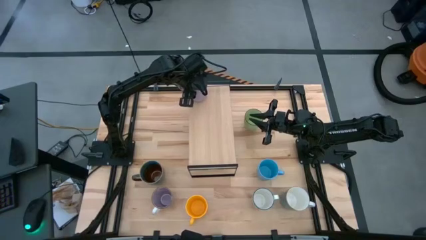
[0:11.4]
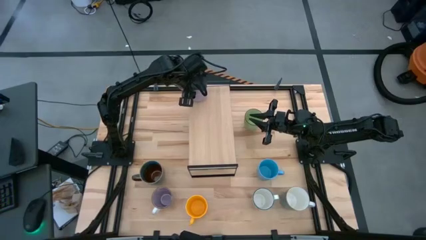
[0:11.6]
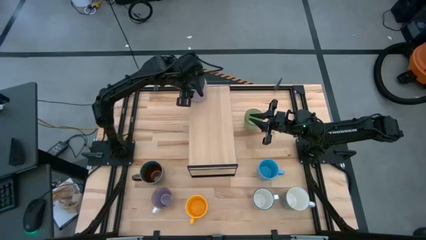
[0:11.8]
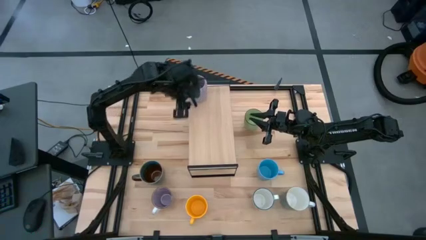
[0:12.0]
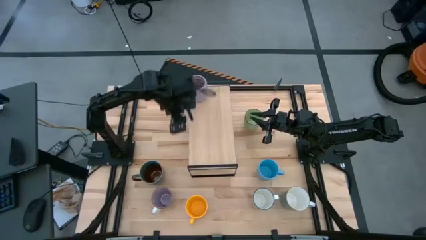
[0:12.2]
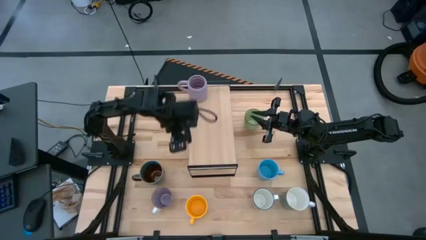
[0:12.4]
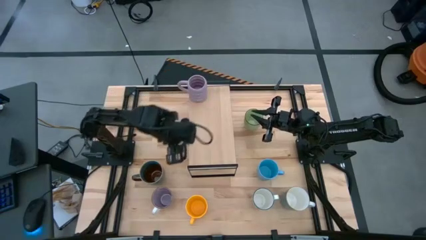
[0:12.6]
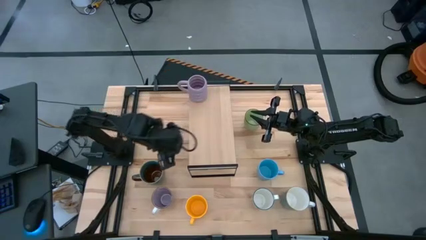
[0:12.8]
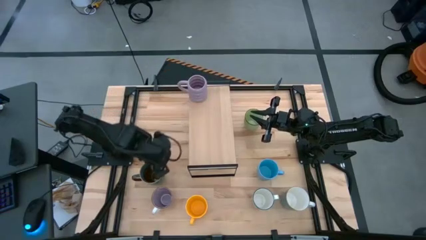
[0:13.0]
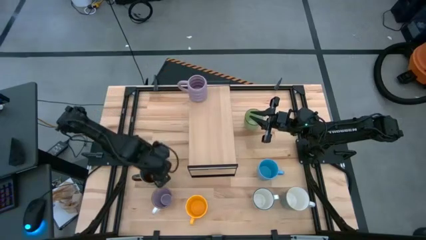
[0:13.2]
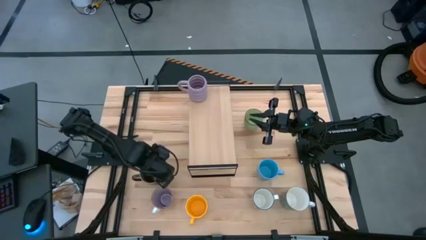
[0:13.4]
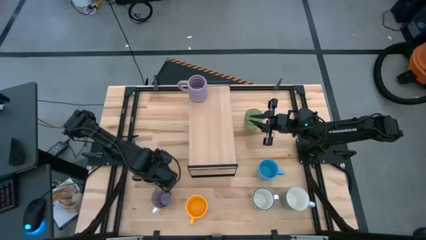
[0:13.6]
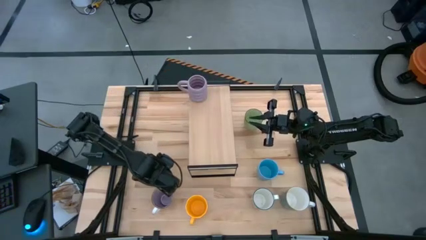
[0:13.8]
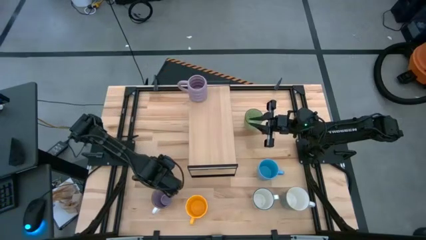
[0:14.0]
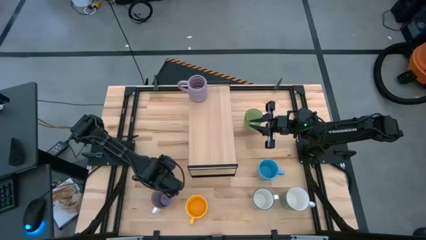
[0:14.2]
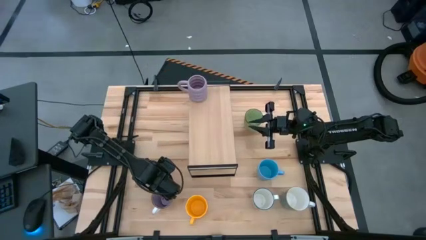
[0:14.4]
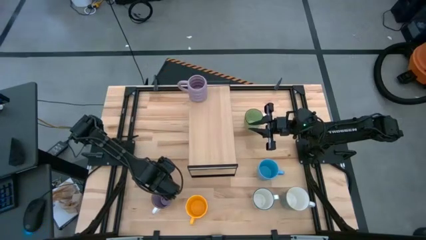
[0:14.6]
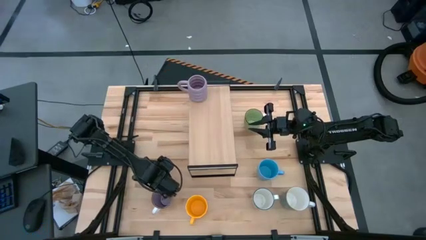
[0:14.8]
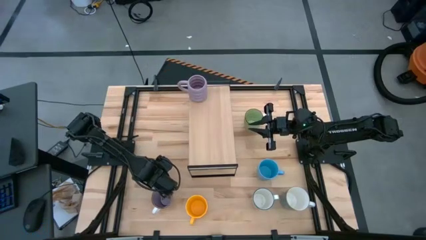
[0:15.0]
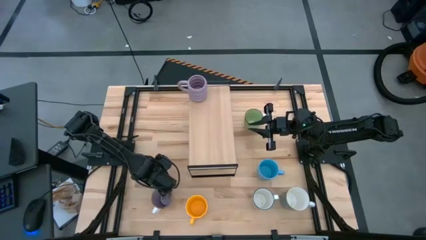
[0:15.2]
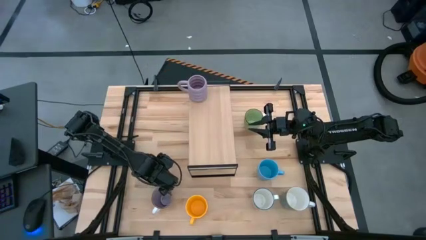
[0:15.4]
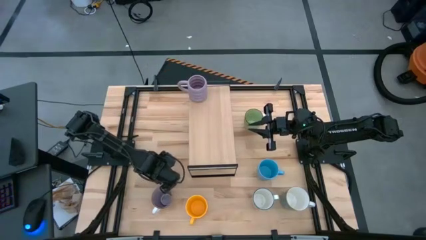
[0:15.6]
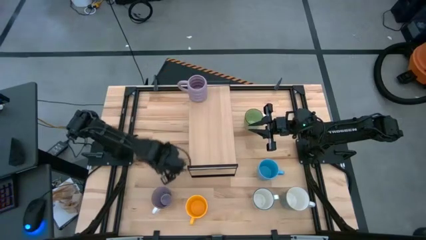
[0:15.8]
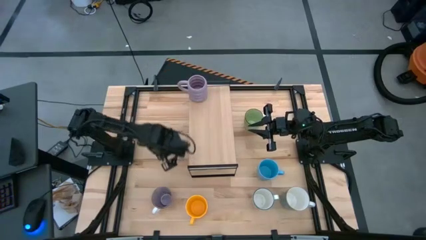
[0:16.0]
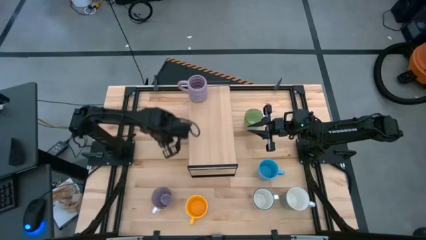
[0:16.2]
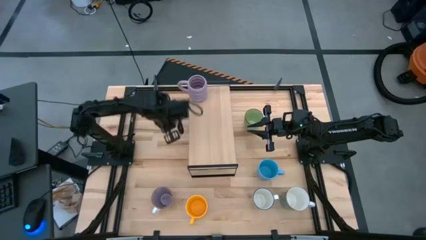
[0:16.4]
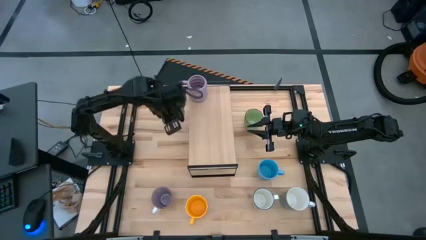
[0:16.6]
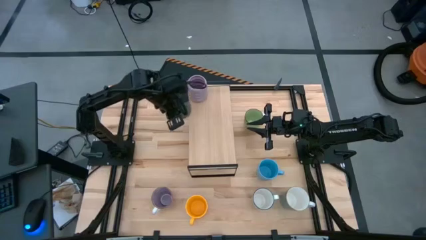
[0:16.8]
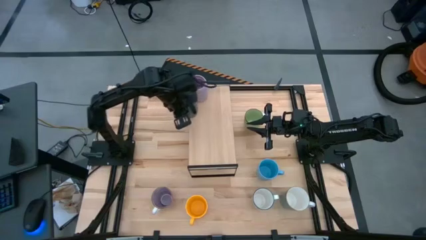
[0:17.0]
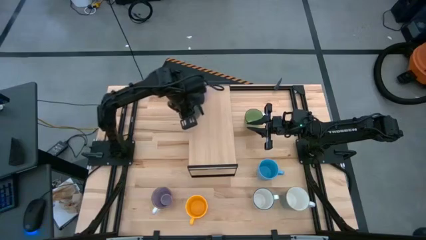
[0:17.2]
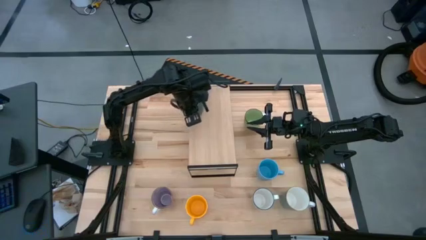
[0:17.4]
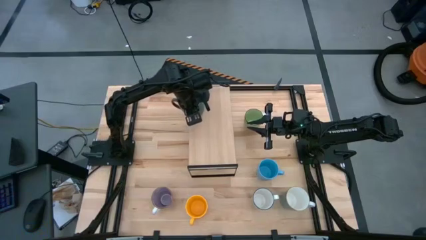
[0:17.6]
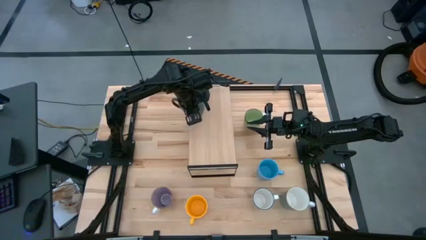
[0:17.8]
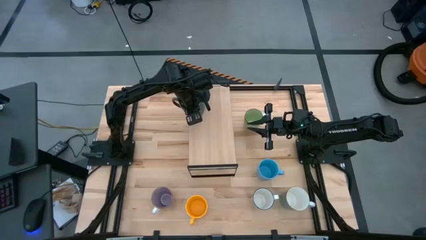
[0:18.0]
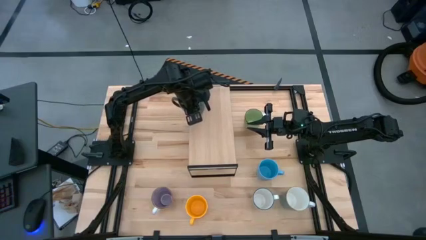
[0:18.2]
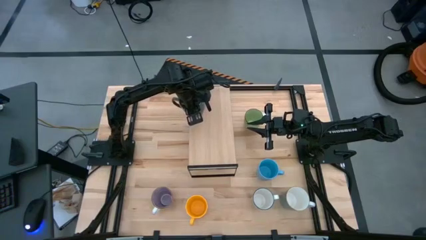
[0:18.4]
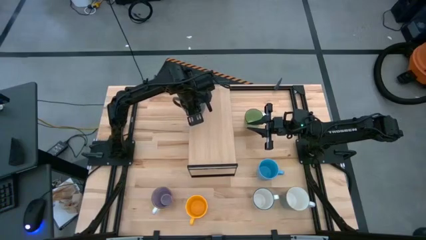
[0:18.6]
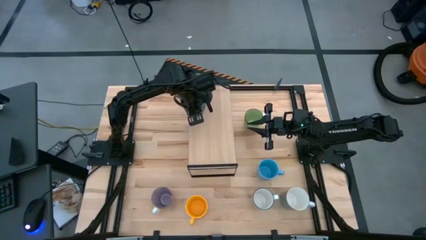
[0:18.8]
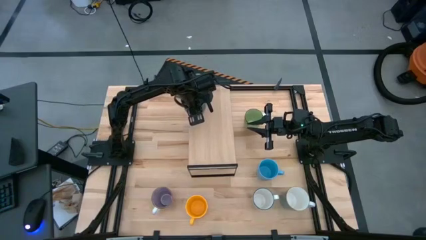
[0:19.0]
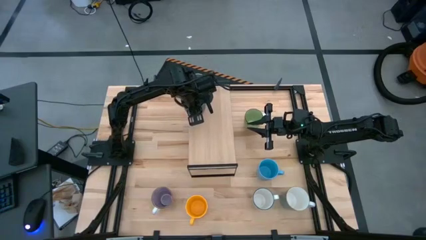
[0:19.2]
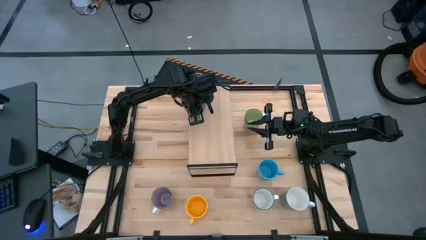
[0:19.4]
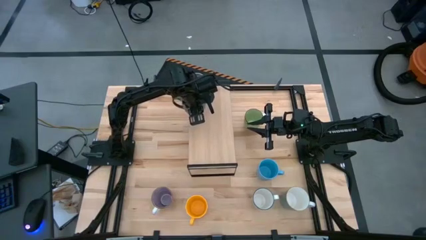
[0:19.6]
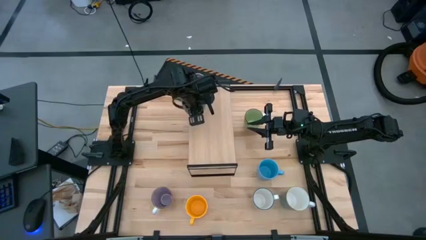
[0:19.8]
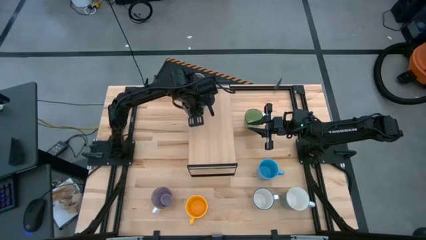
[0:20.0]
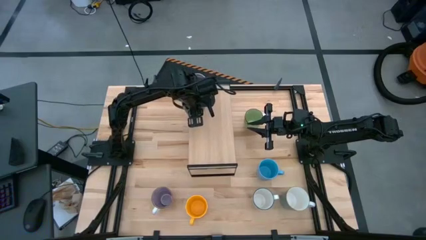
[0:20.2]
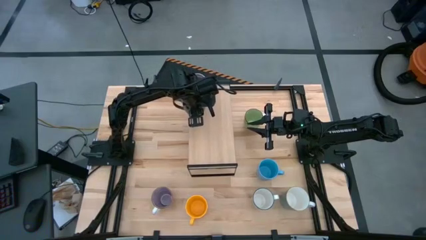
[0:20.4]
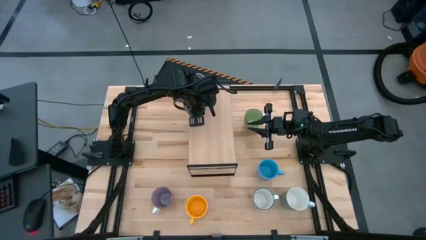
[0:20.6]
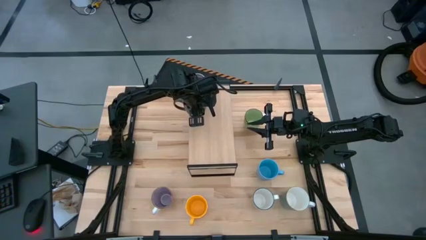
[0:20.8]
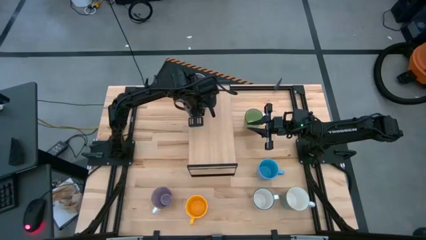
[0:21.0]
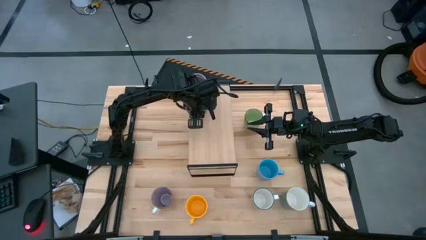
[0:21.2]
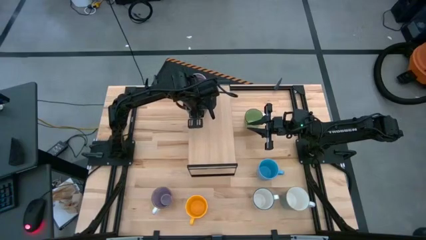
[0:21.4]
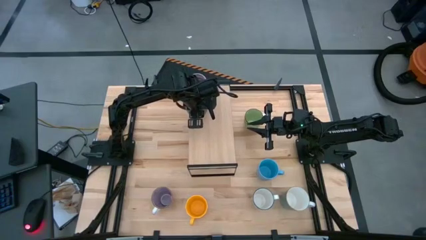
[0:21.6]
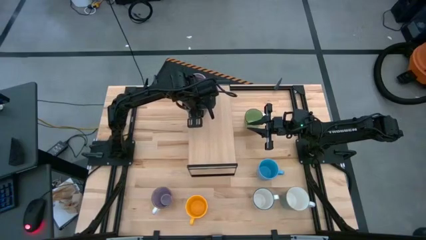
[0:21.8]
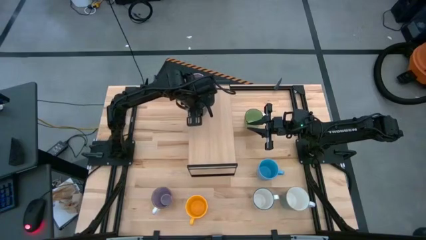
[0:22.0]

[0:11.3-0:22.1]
Task: Place coffee mugs
Put the blue patterned mug on the shelf

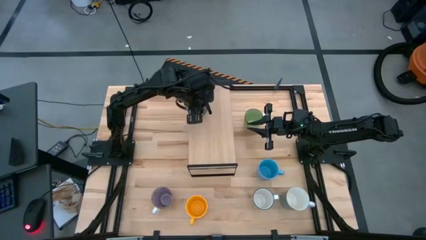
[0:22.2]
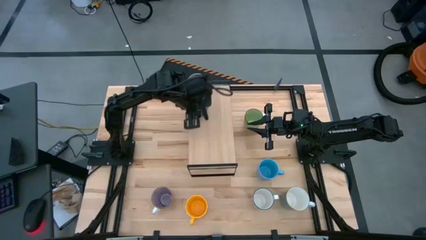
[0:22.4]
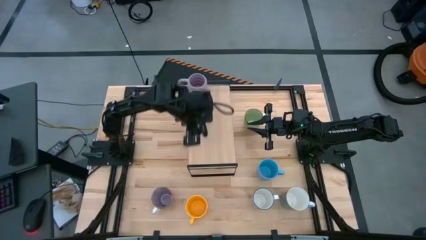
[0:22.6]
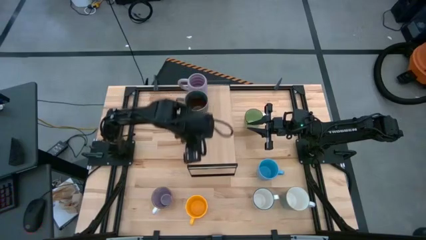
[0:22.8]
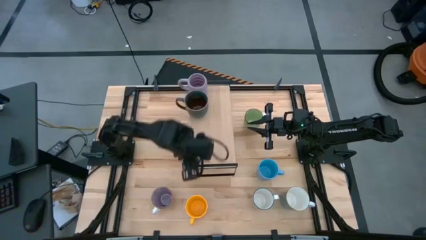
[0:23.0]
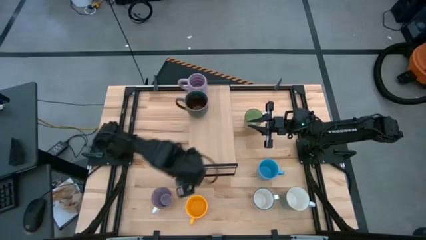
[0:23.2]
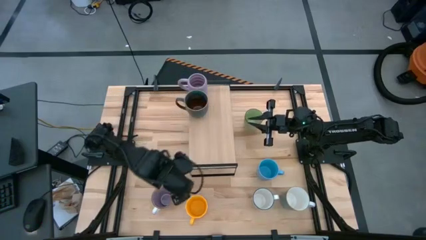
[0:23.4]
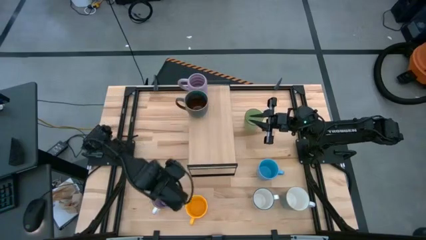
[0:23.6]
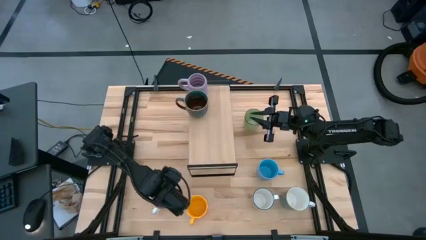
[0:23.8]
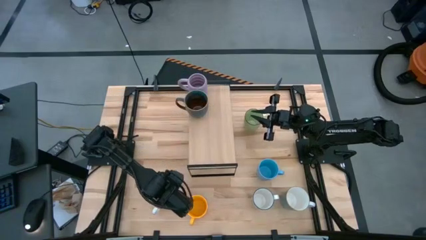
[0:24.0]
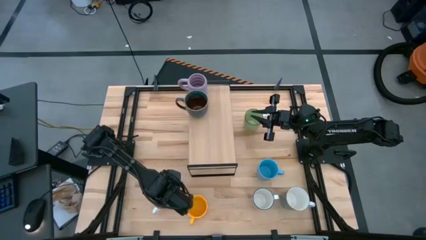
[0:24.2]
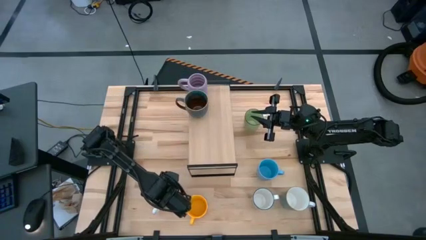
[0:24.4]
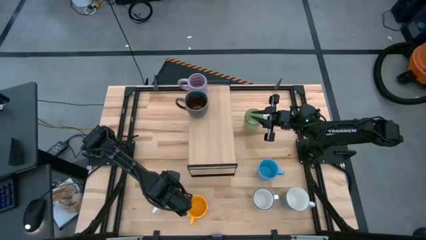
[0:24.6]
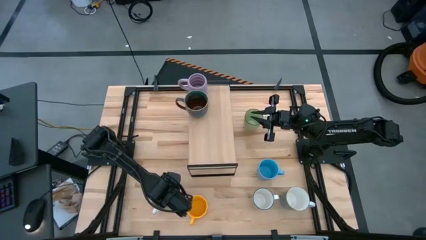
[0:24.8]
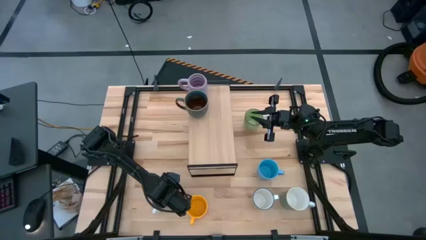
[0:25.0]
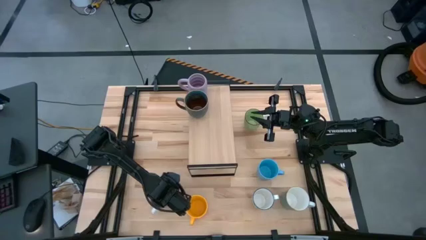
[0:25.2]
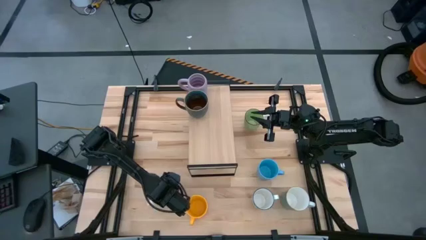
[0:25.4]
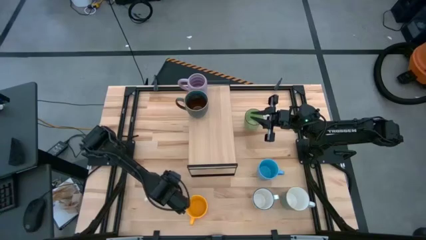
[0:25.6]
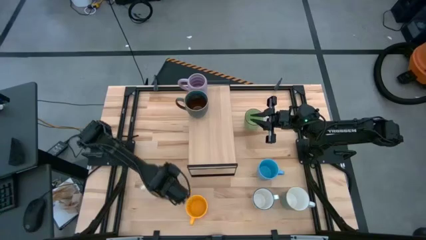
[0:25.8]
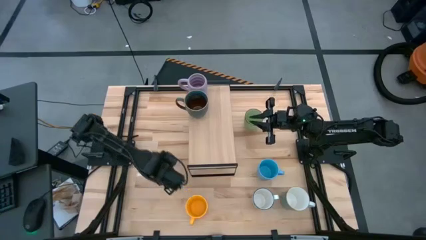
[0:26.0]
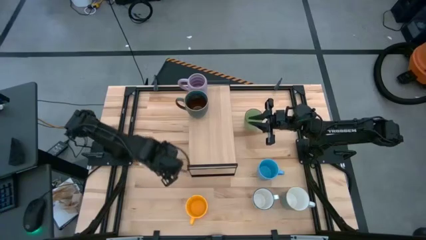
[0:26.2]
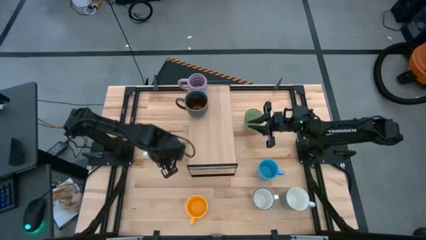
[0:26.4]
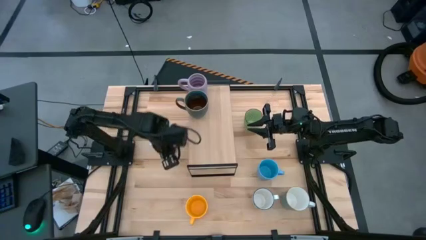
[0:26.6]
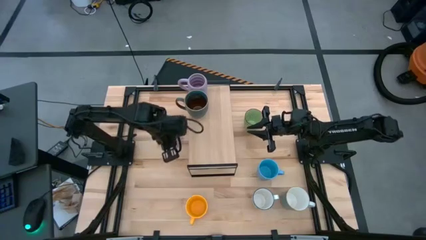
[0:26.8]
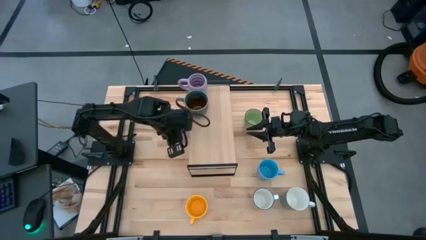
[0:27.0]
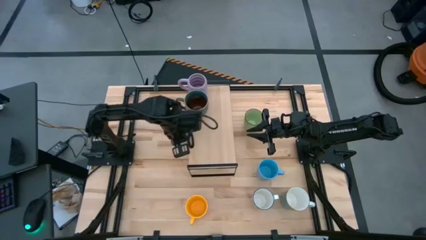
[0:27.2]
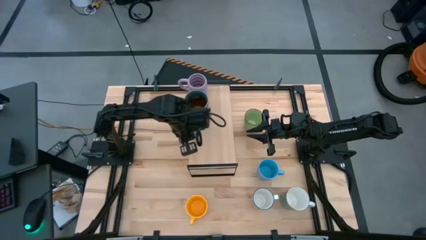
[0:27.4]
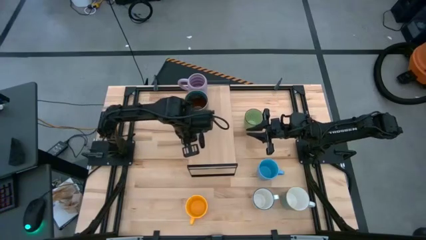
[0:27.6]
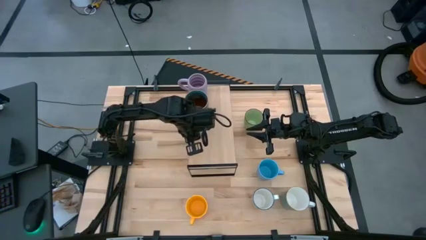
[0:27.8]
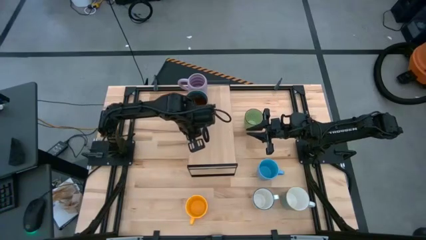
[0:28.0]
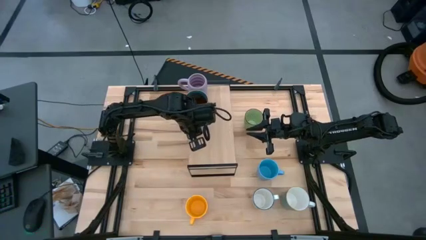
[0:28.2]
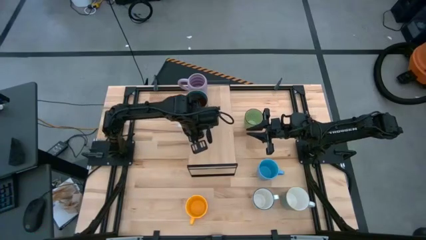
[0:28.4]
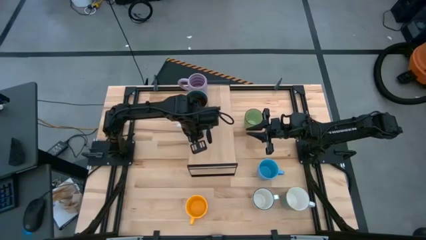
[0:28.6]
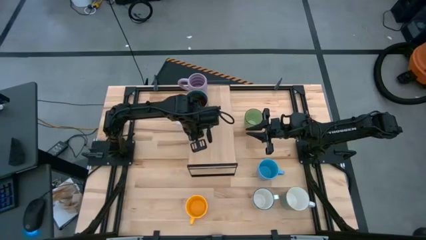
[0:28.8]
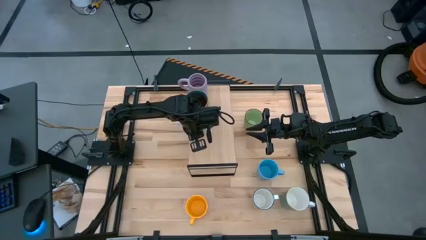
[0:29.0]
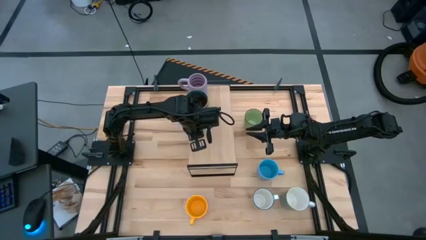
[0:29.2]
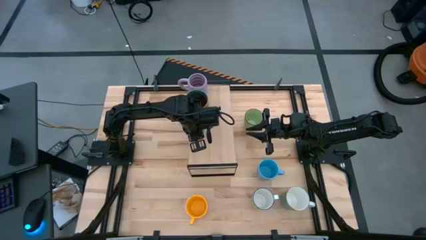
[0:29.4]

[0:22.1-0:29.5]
Put the purple mug on the shelf
